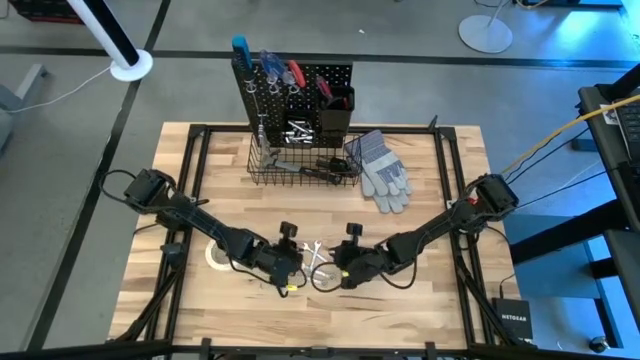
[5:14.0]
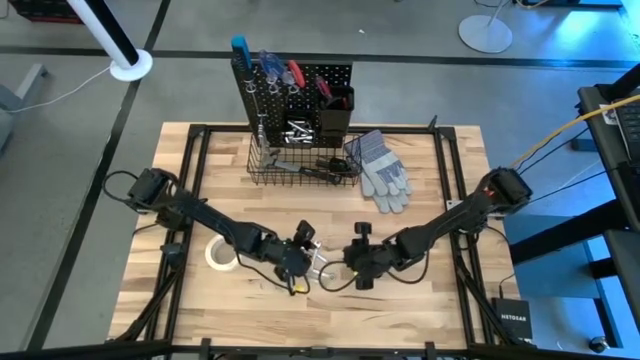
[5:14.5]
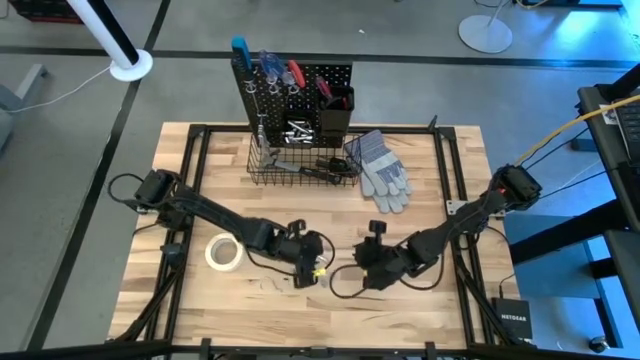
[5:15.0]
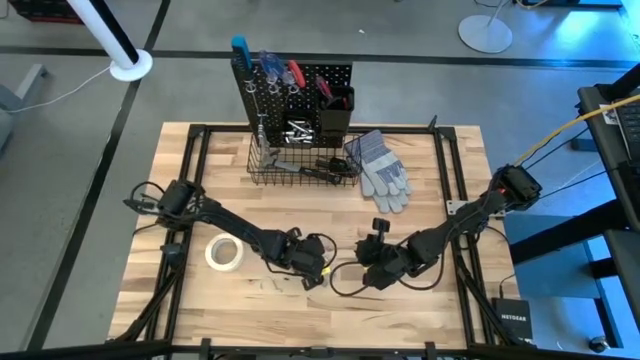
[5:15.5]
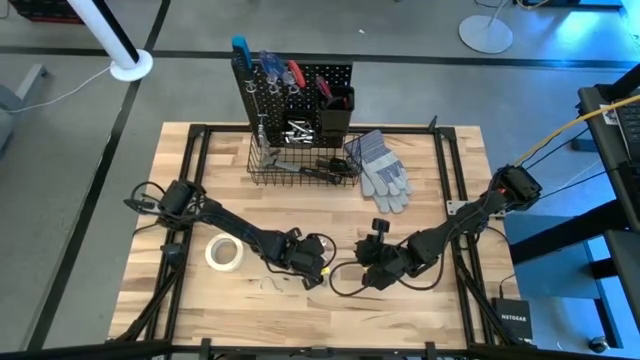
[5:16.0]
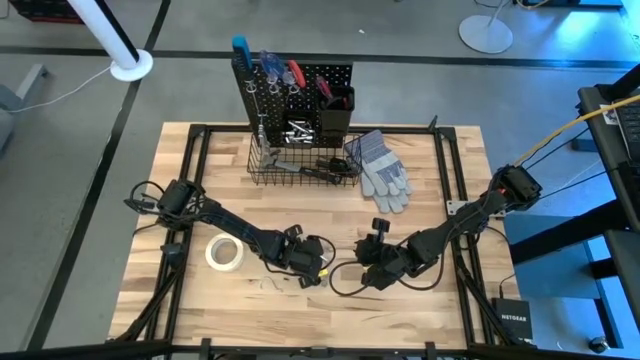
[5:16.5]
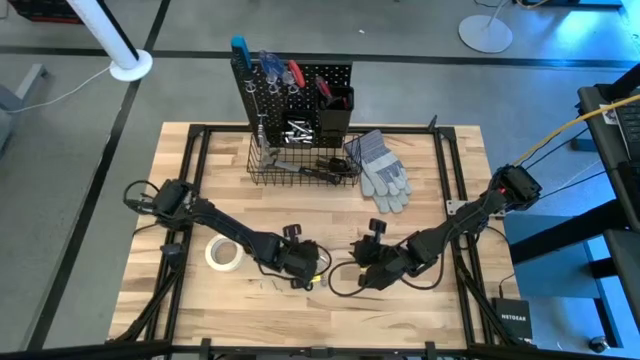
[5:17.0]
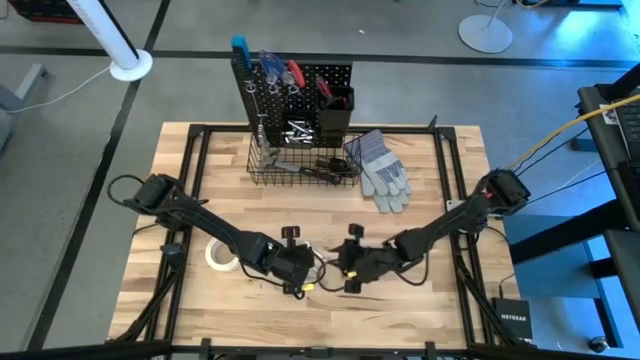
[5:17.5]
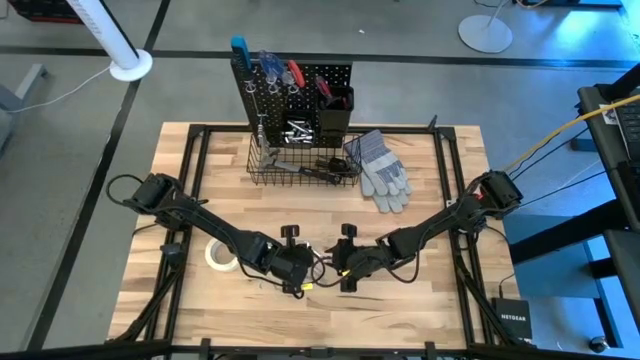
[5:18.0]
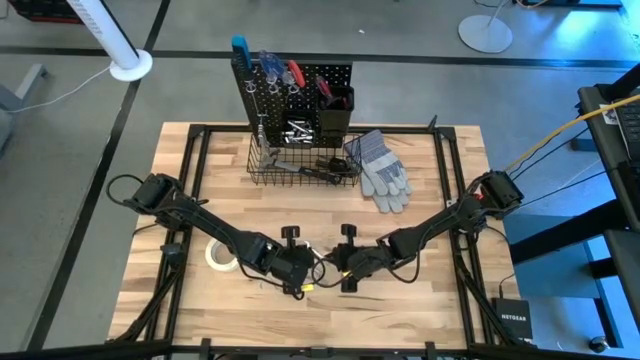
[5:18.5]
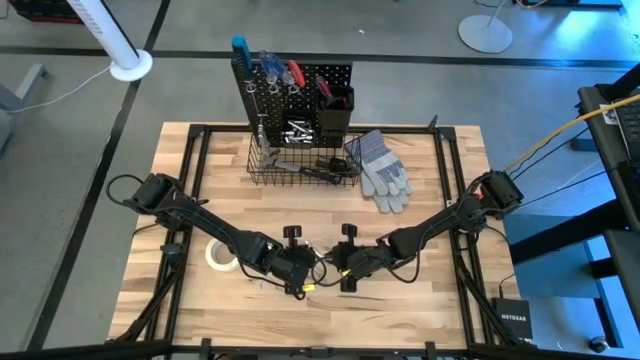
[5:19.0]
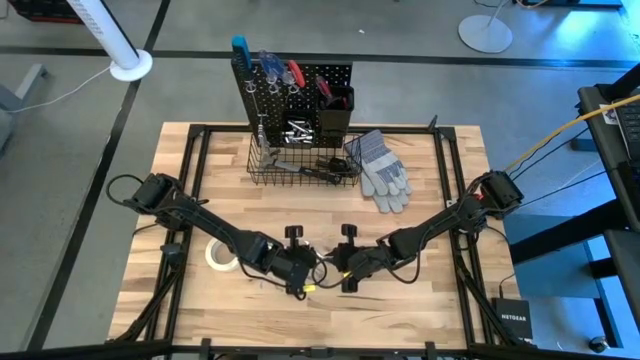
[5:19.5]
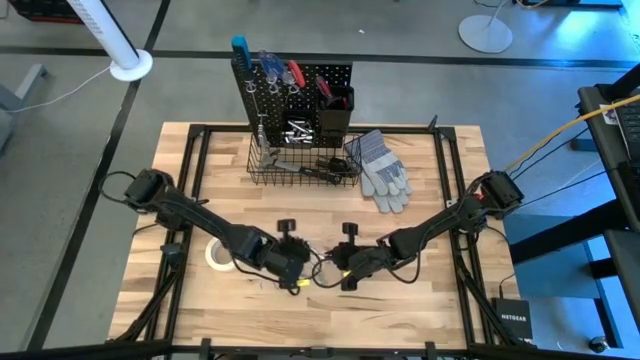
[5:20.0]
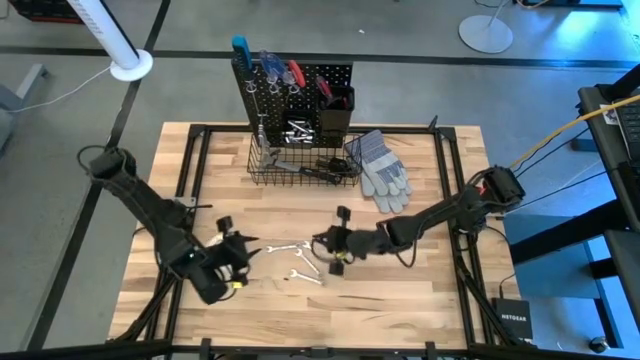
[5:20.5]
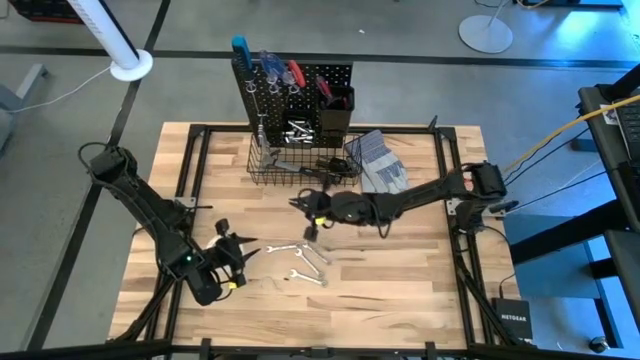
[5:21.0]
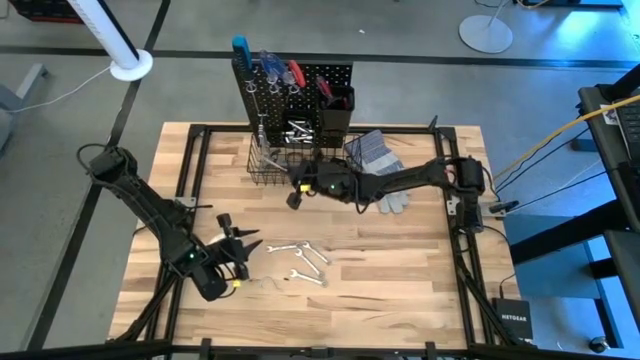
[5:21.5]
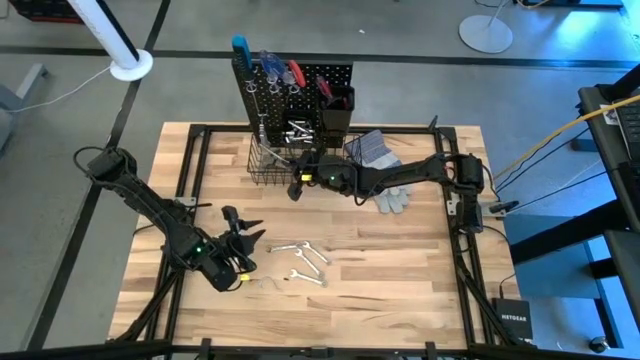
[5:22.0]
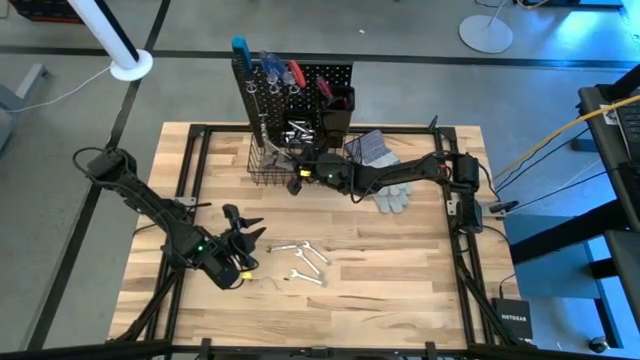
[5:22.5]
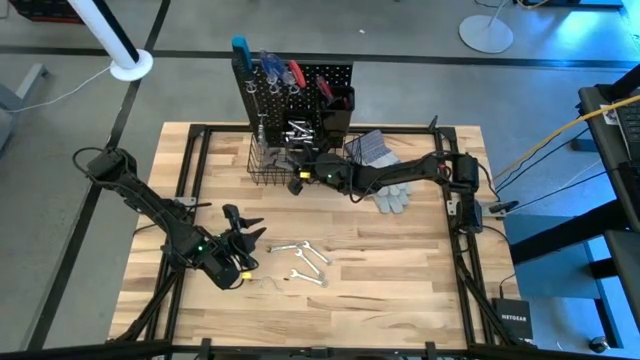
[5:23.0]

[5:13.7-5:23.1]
Task: Hang tools onto peg board
Hang the wrench on the peg board

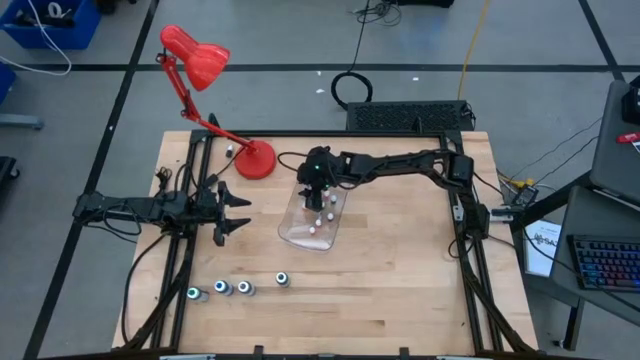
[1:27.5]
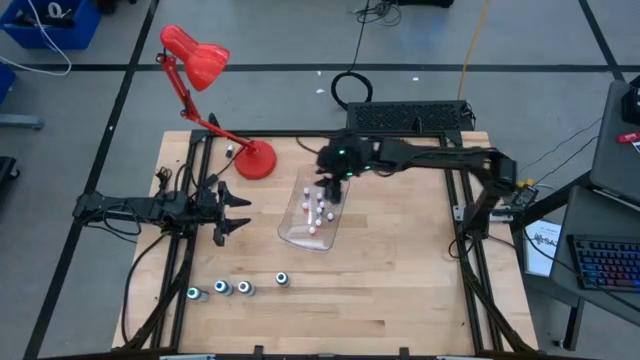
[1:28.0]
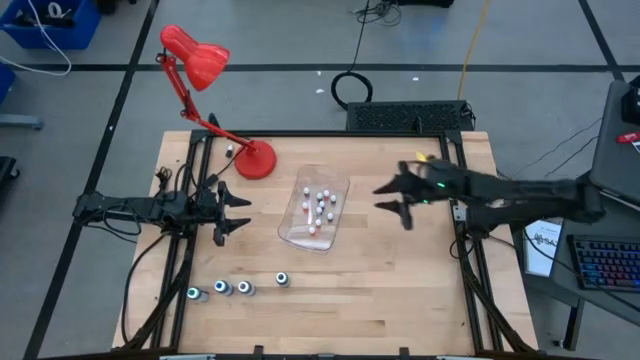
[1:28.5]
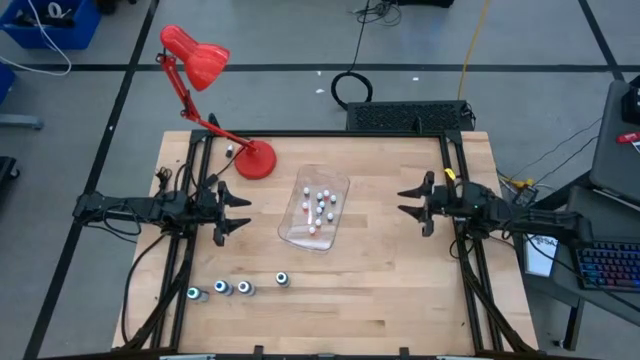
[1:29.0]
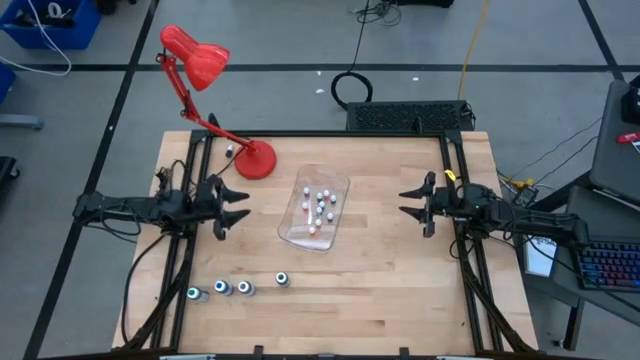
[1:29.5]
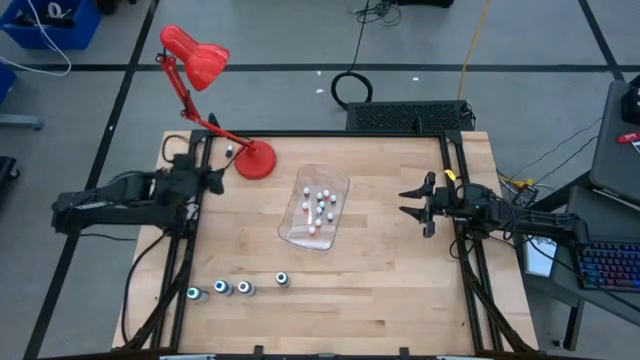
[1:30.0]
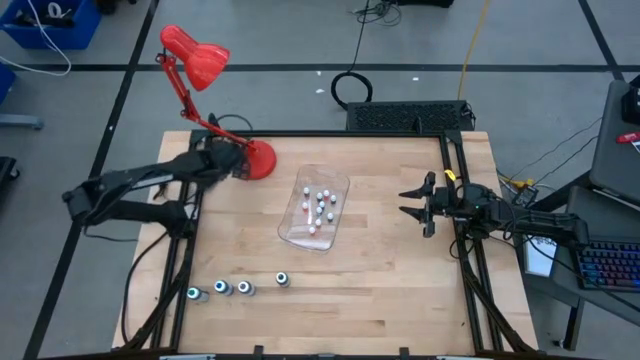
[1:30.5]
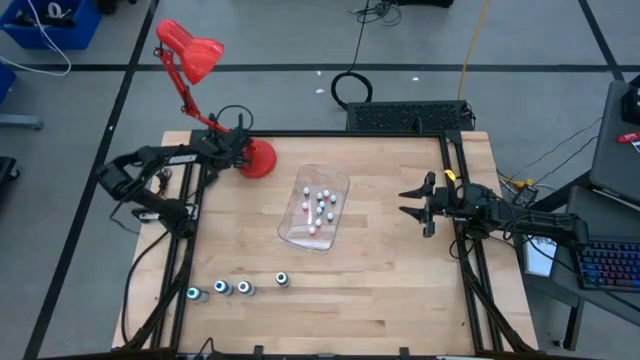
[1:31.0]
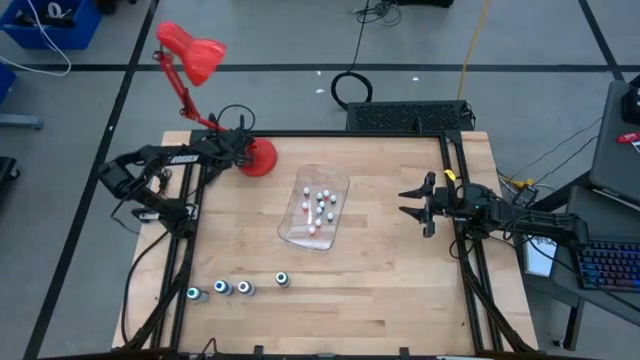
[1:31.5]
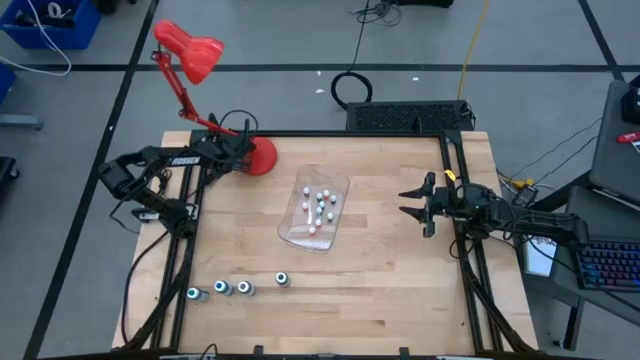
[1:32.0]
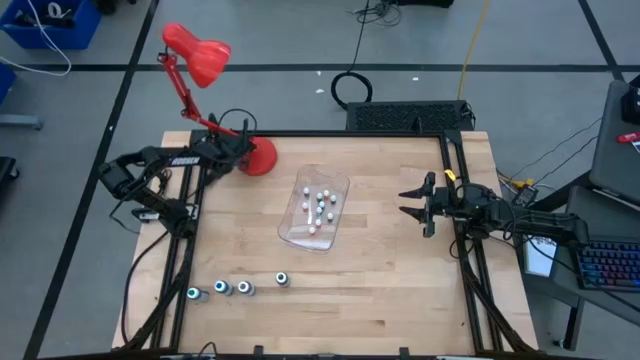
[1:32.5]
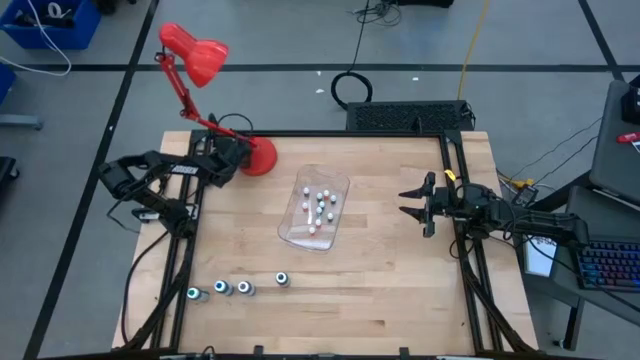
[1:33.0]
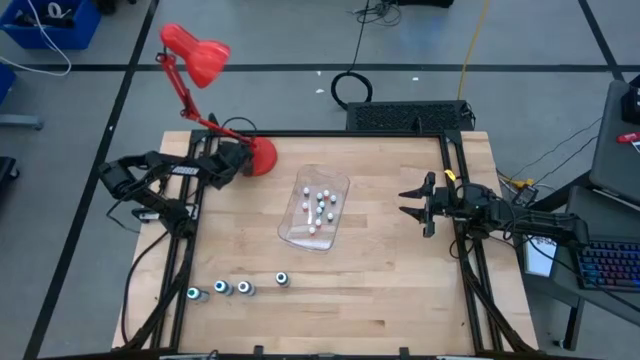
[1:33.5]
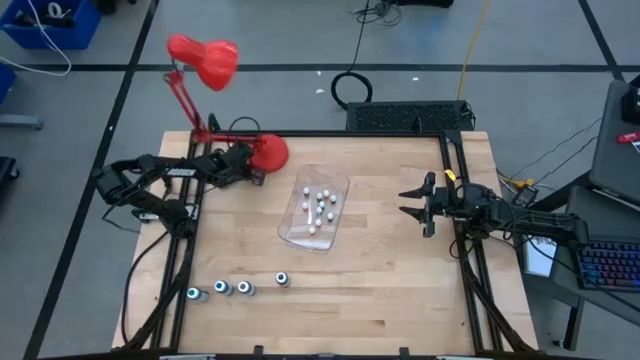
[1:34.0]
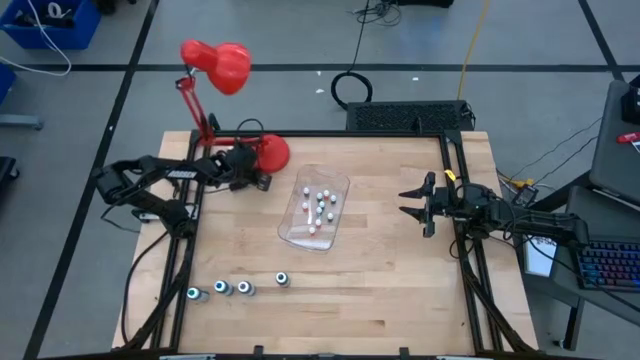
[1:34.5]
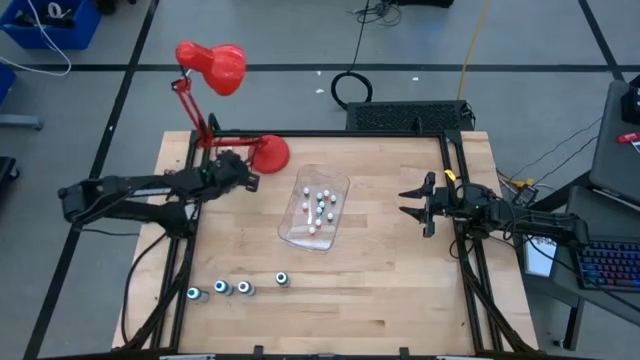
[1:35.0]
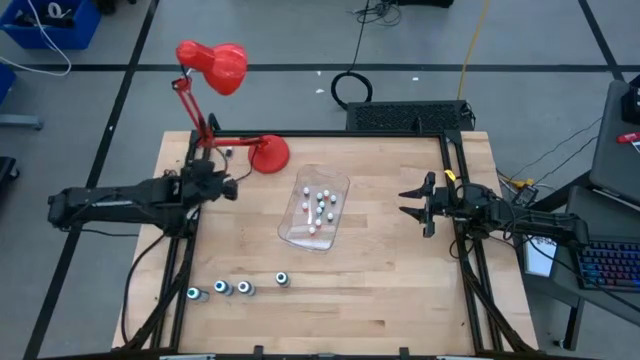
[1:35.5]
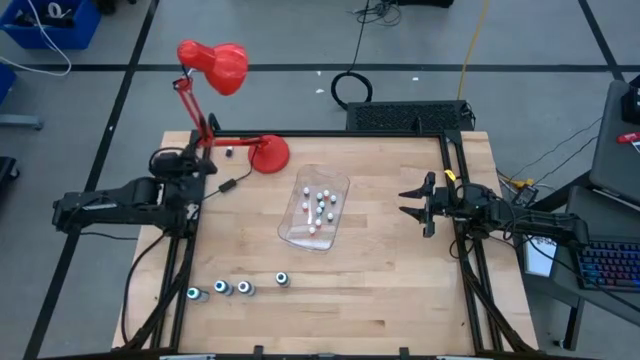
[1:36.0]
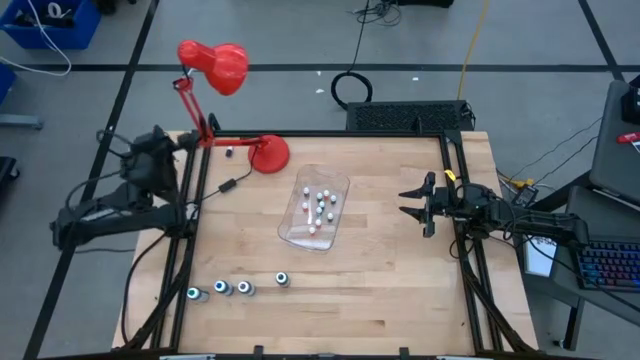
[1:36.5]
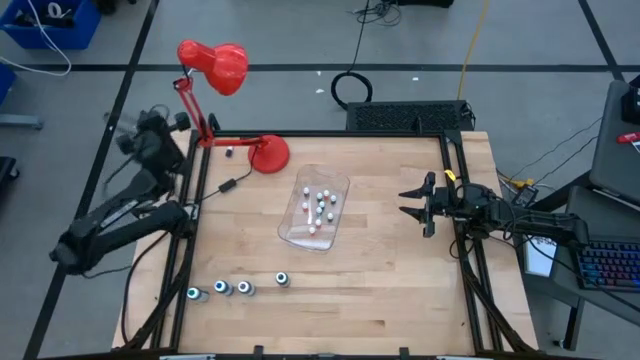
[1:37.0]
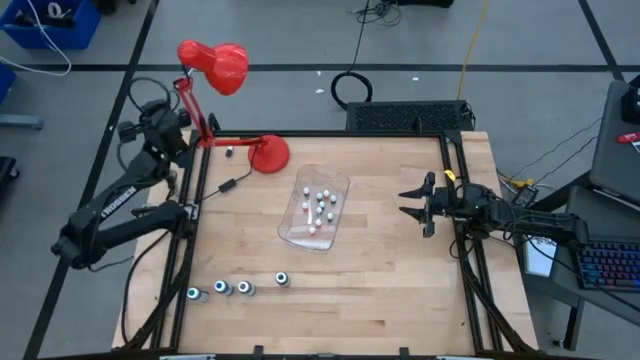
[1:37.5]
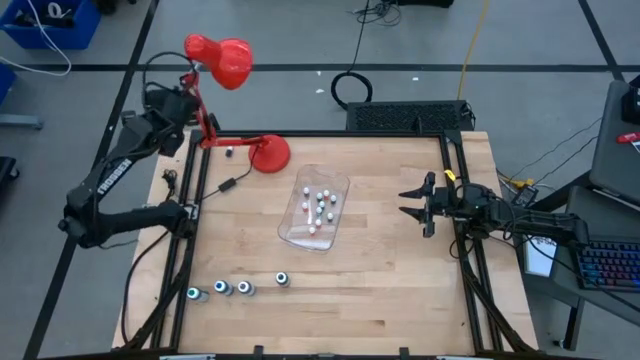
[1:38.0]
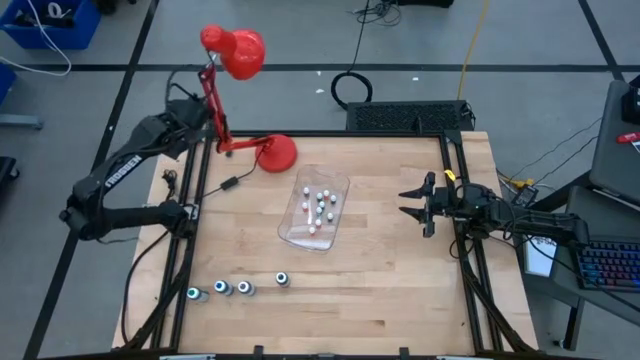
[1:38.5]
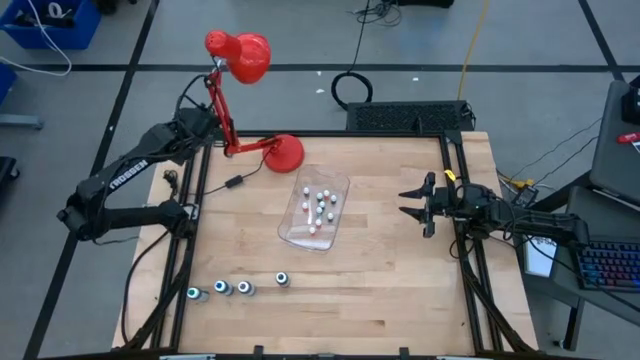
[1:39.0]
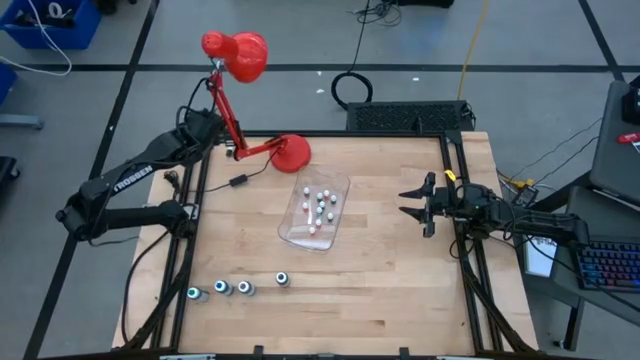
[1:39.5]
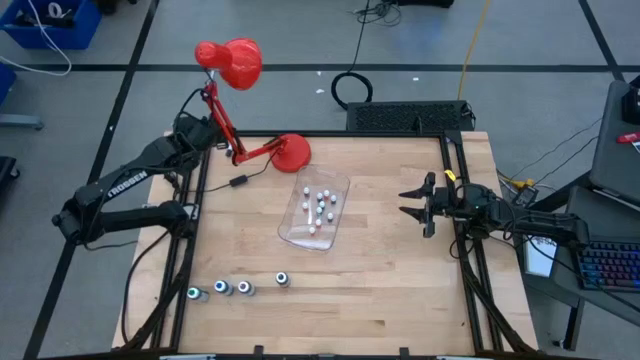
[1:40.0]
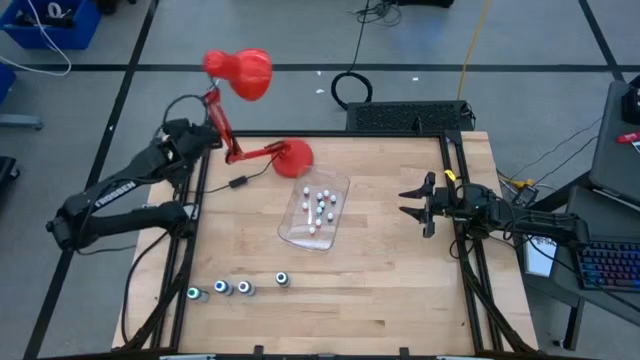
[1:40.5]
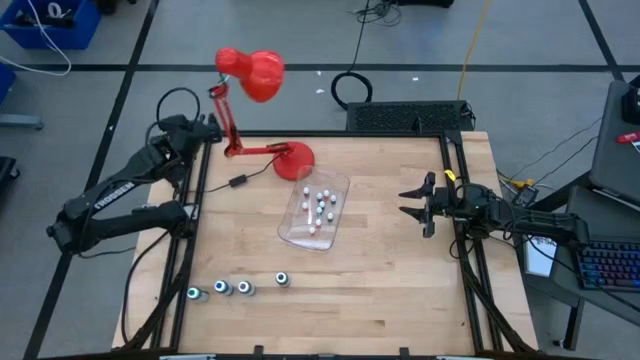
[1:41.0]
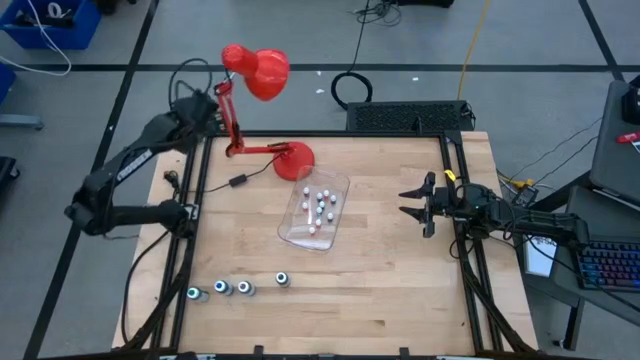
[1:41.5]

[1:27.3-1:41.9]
Task: Pick & Place food coloring
Put the small purple food coloring bottle into the transparent bin
